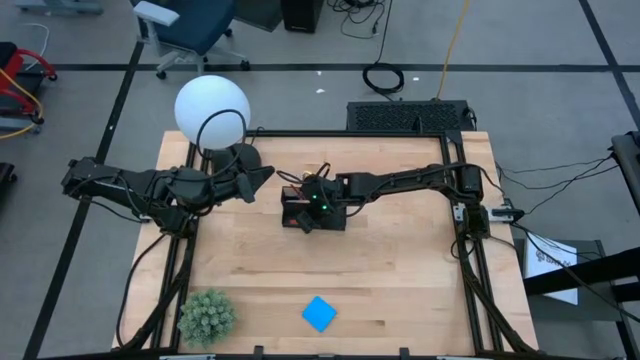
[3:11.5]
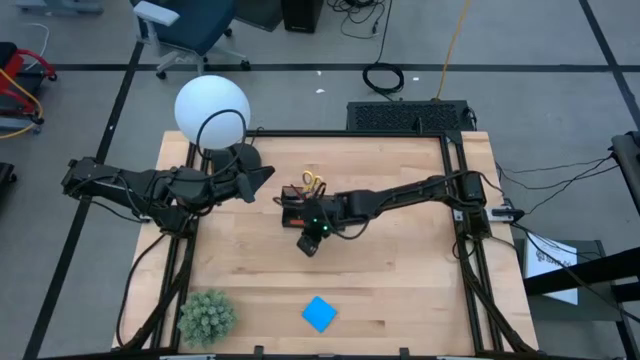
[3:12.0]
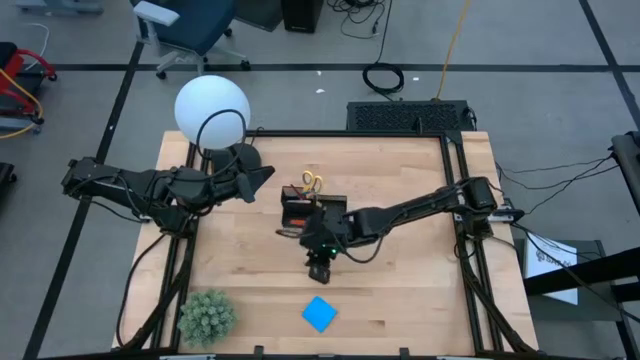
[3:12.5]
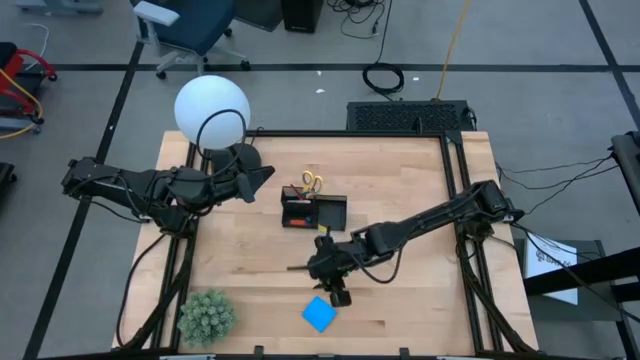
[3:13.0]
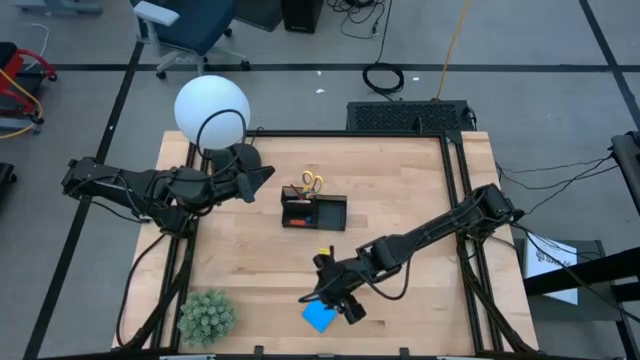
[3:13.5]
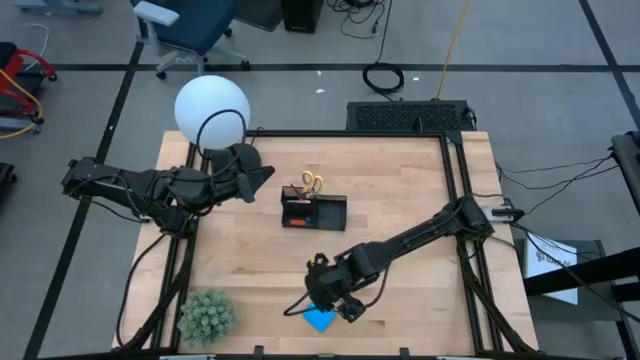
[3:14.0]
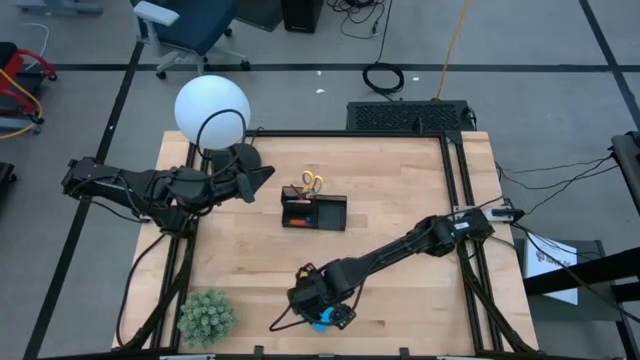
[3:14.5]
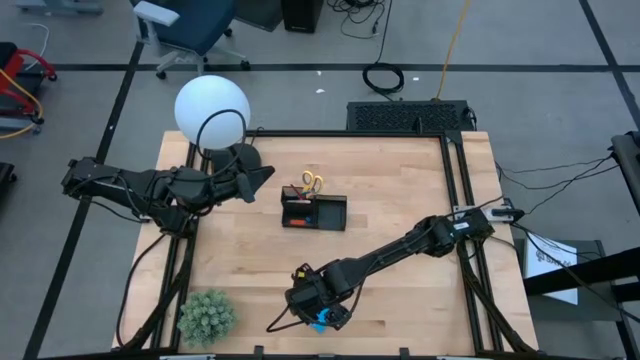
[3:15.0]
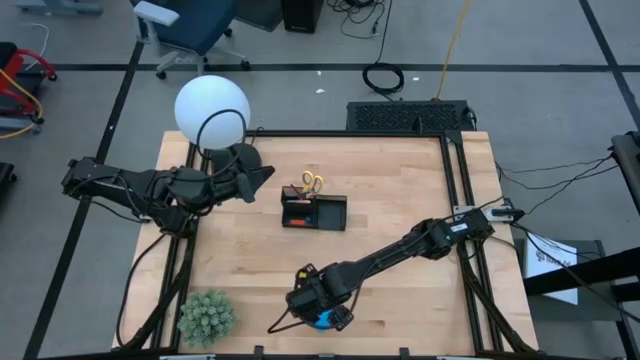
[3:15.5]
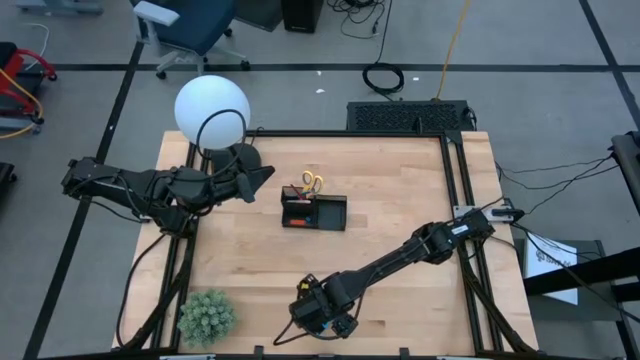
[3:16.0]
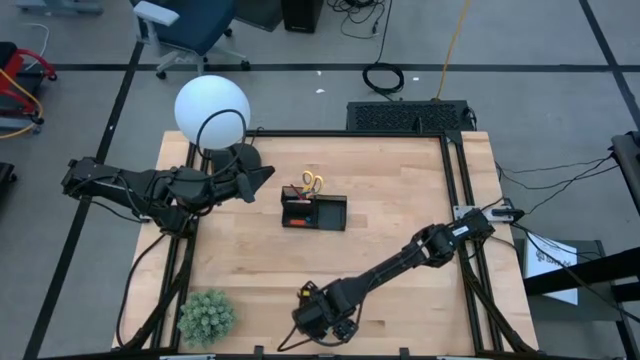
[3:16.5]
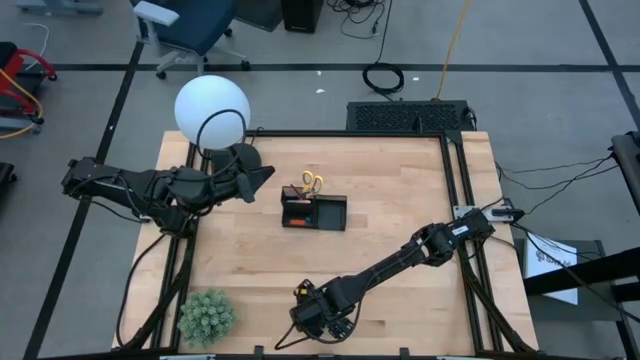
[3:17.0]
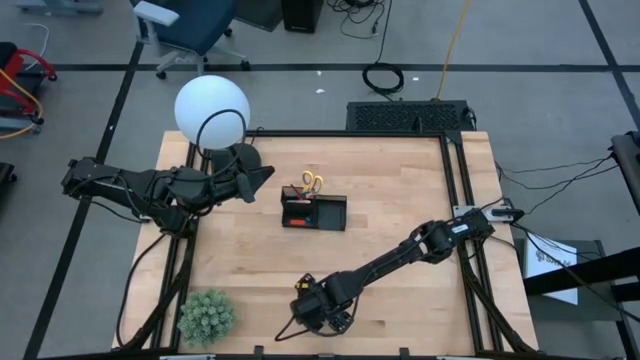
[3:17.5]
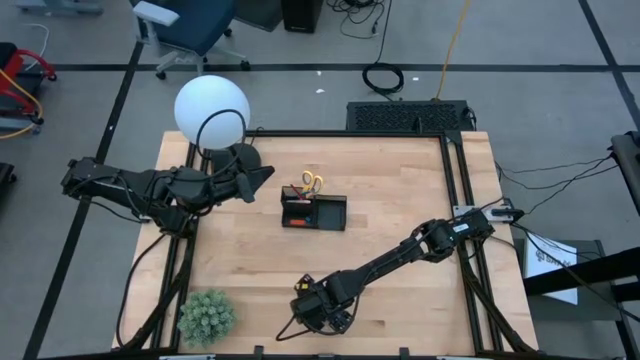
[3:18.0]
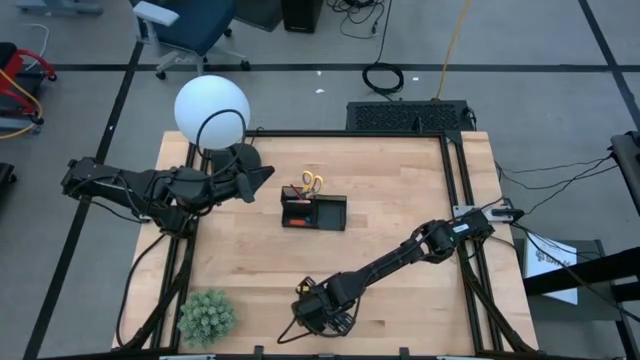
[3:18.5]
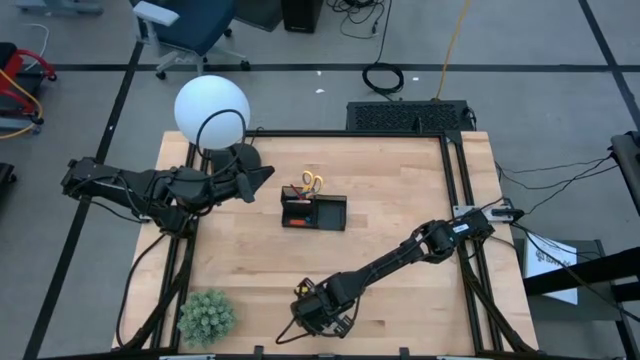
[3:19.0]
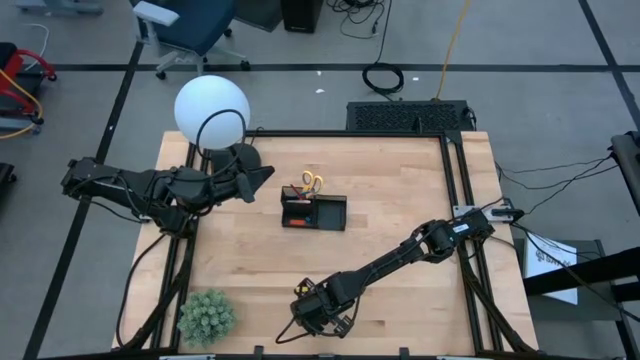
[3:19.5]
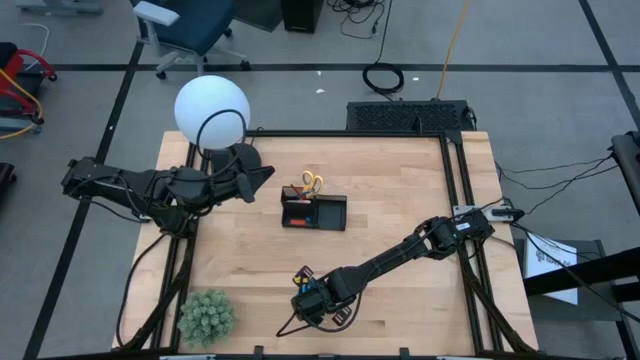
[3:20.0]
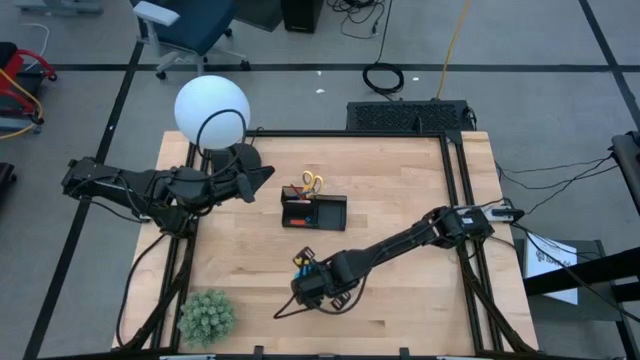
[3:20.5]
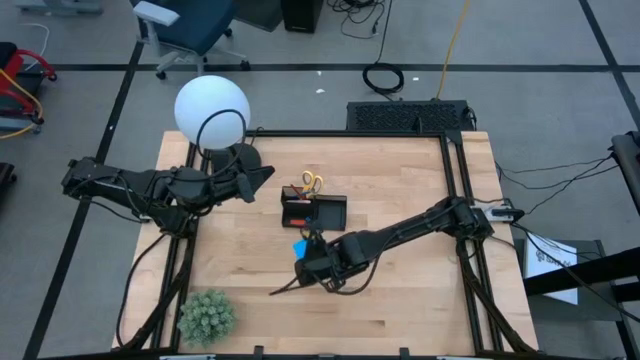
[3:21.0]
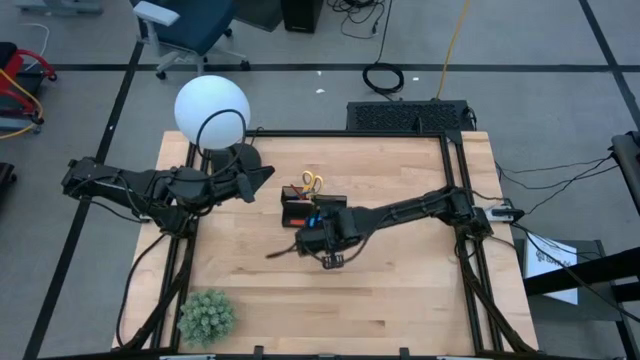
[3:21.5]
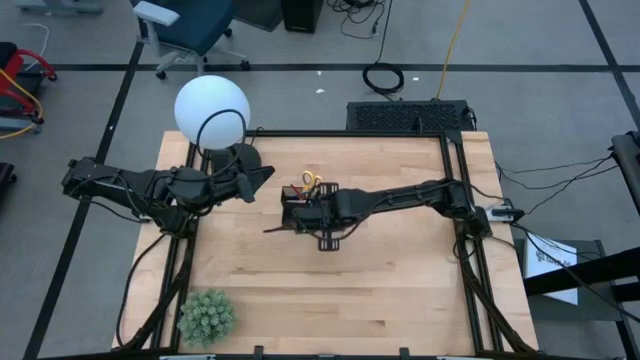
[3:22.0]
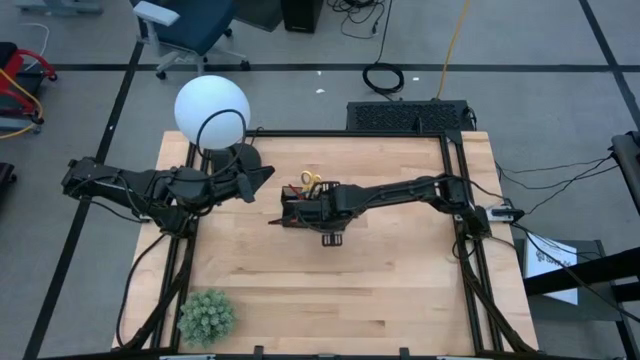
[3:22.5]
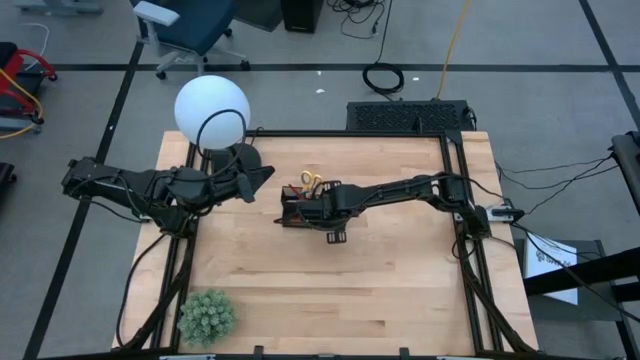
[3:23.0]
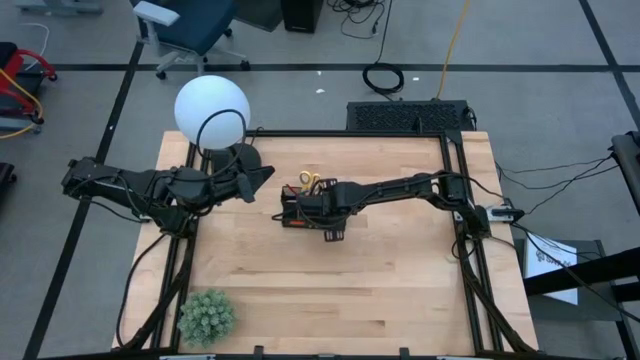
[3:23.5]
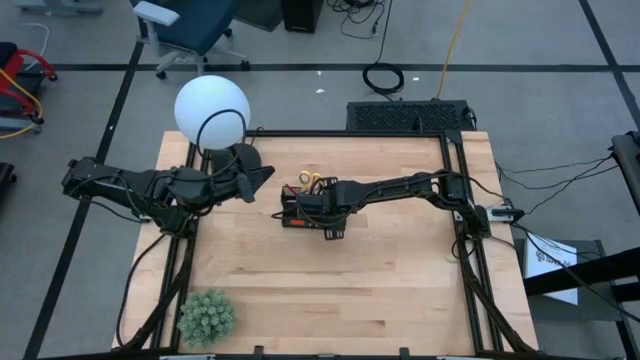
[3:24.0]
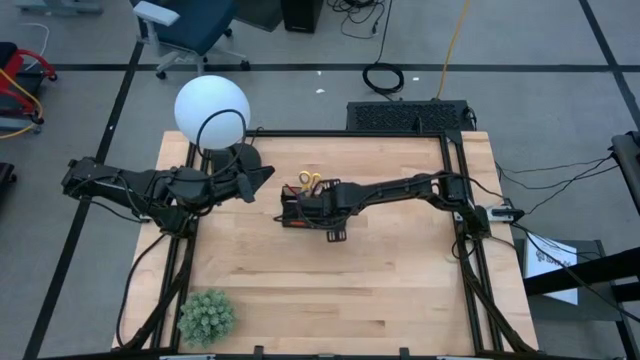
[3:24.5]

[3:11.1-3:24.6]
Task: Pick and place office supplies into organizer
Put the blue sticky note into the desk organizer
